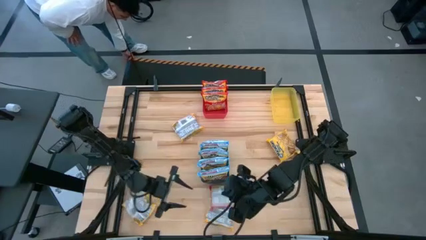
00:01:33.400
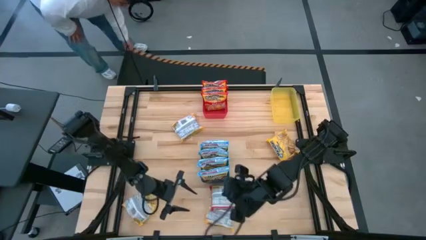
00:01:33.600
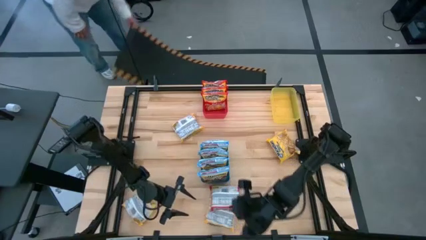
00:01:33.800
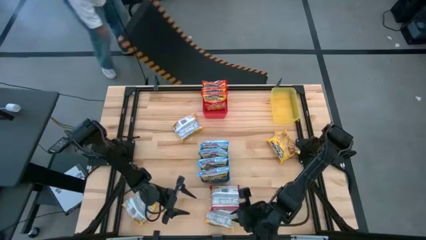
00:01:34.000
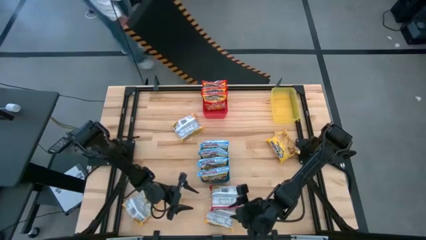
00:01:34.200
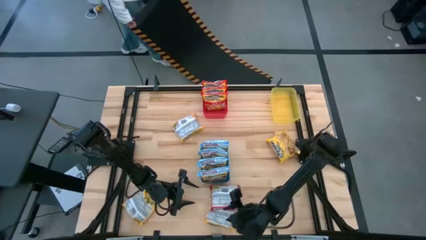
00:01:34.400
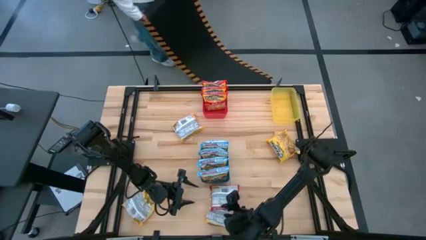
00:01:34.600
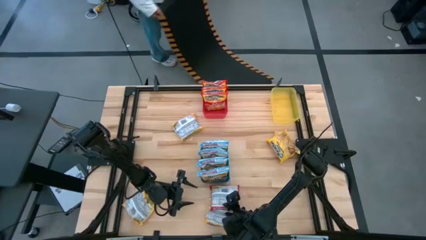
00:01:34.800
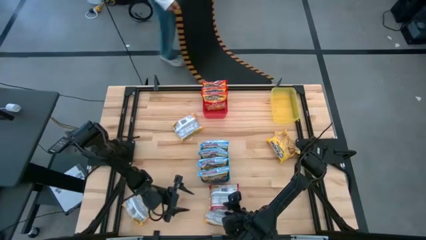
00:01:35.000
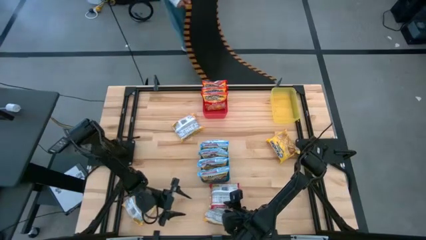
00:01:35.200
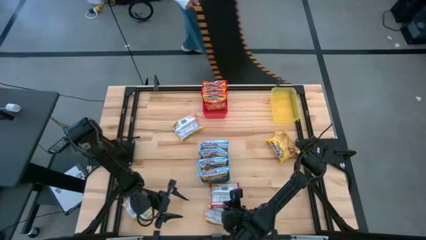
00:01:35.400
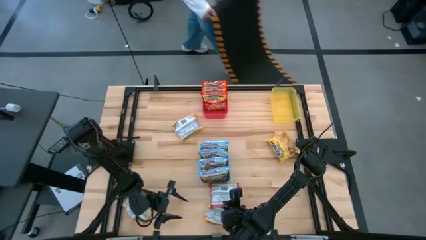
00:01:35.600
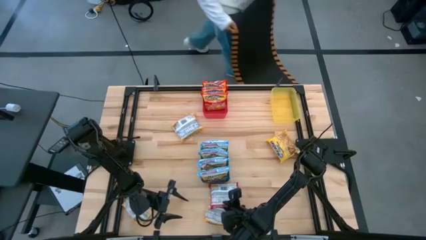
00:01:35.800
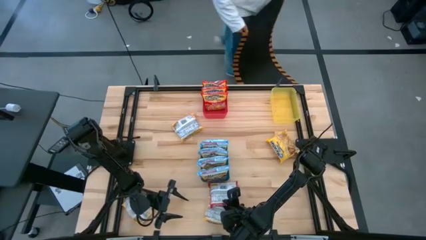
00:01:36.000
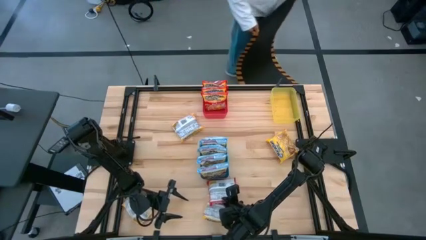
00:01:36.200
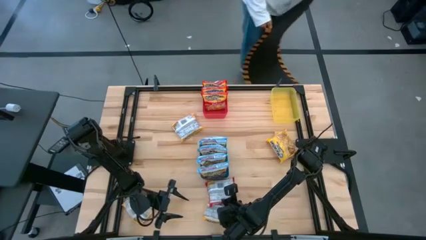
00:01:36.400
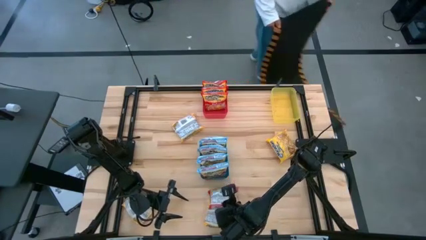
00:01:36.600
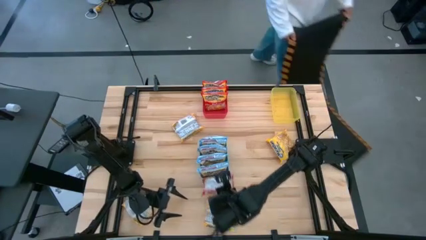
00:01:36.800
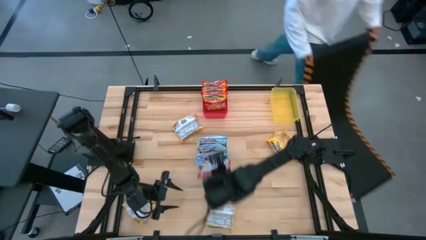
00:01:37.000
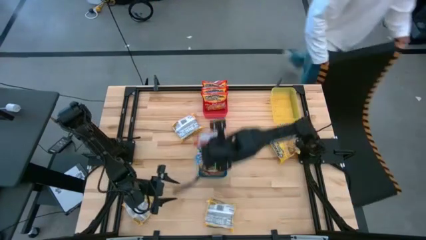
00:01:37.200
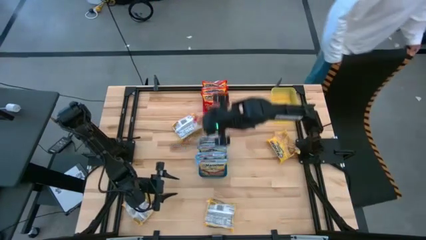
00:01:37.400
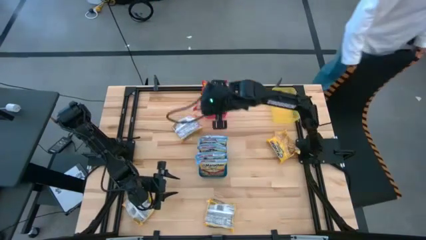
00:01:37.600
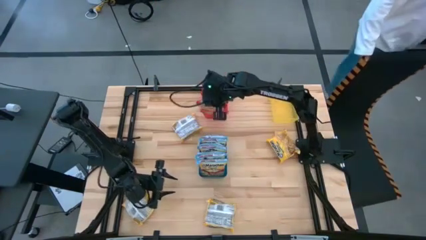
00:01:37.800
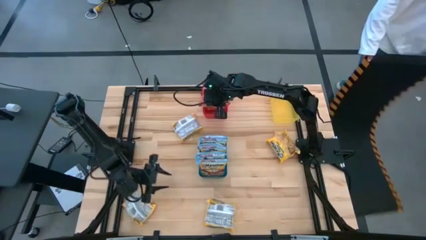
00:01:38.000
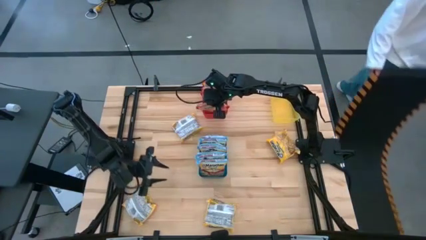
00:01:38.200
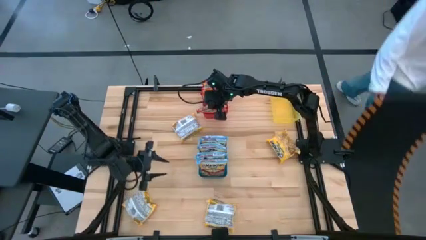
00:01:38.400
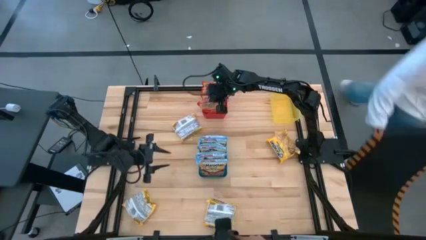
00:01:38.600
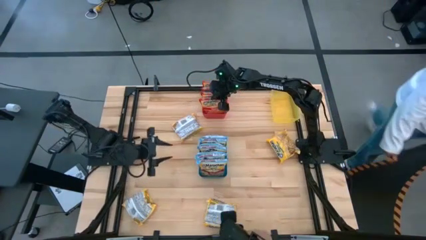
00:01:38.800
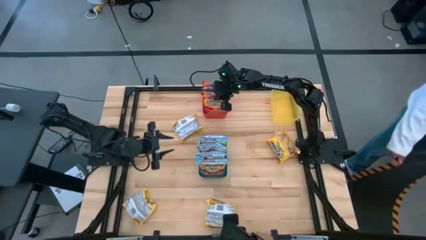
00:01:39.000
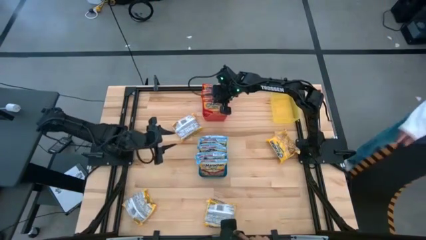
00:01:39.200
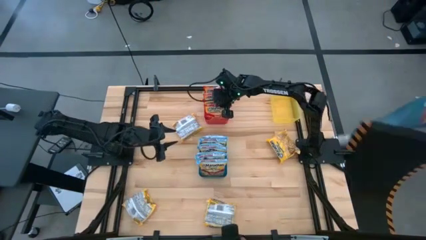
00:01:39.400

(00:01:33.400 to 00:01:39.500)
Task: Sort Maruchan noodles
Put the red noodle pack into the red bin

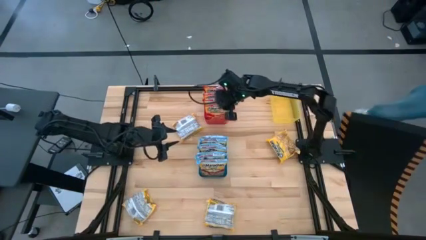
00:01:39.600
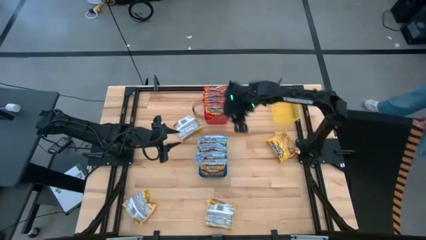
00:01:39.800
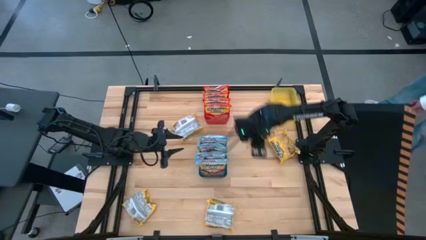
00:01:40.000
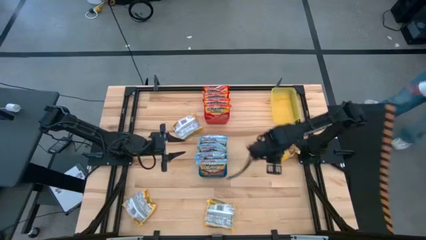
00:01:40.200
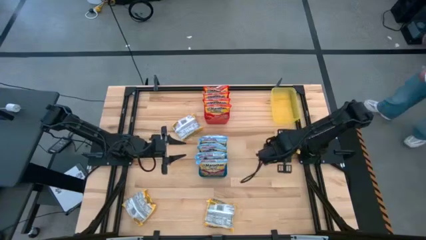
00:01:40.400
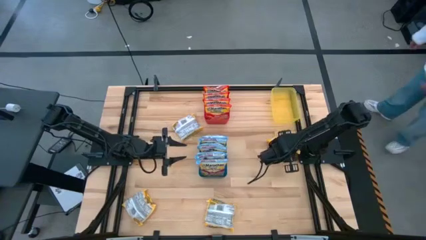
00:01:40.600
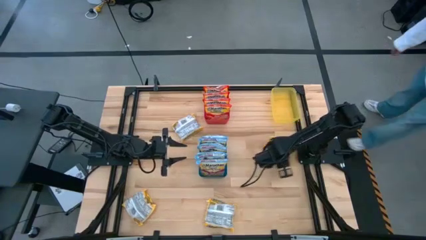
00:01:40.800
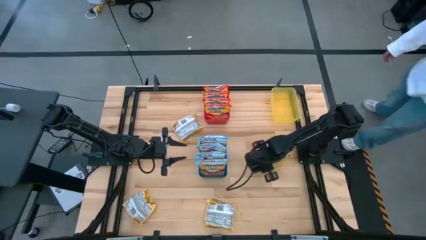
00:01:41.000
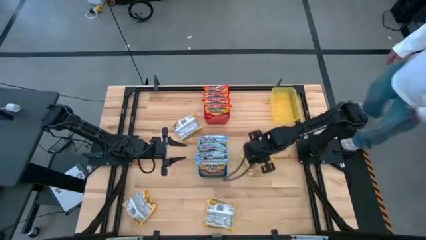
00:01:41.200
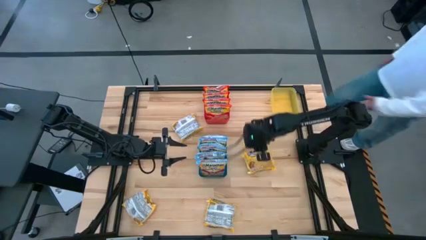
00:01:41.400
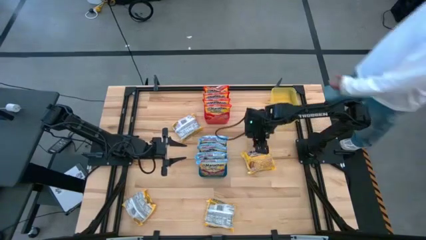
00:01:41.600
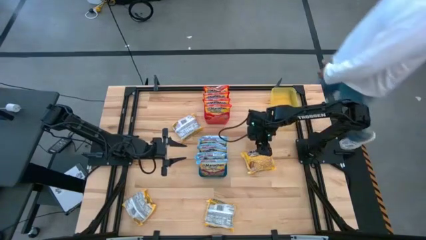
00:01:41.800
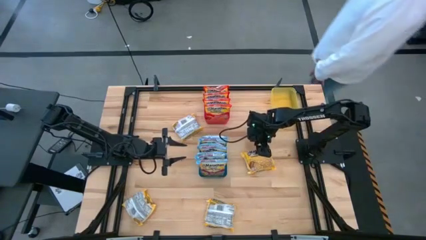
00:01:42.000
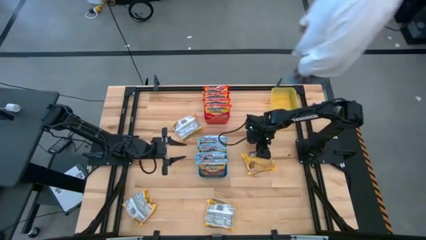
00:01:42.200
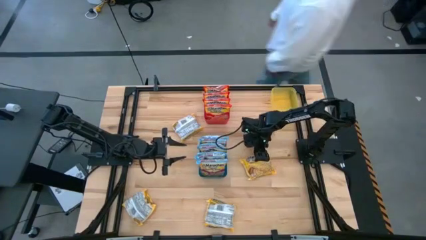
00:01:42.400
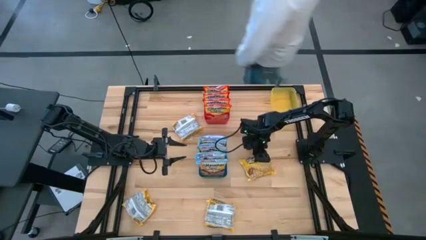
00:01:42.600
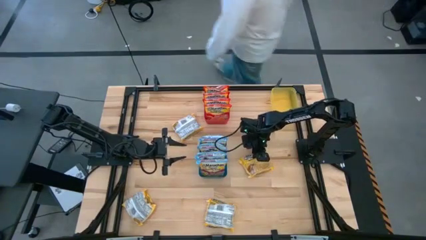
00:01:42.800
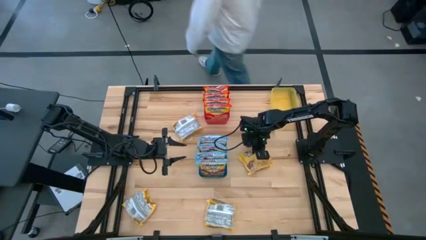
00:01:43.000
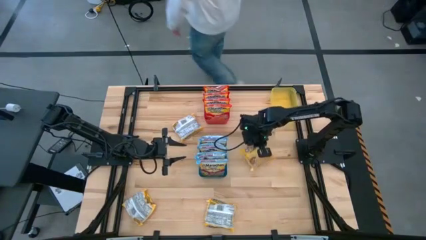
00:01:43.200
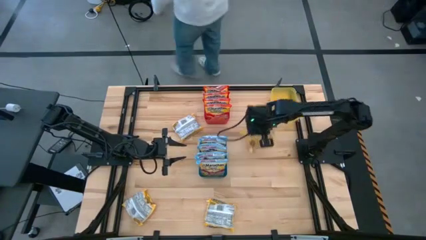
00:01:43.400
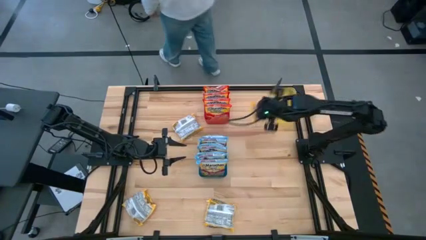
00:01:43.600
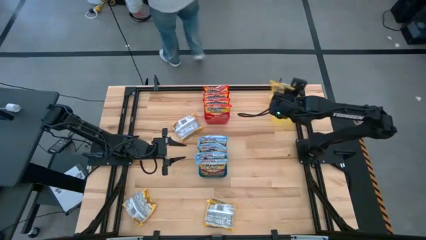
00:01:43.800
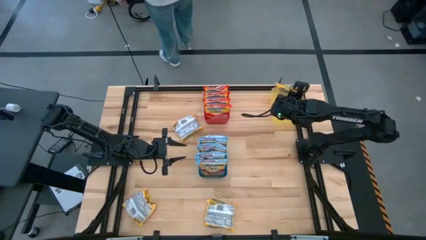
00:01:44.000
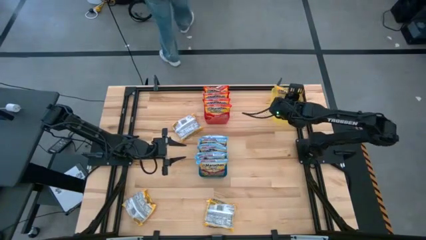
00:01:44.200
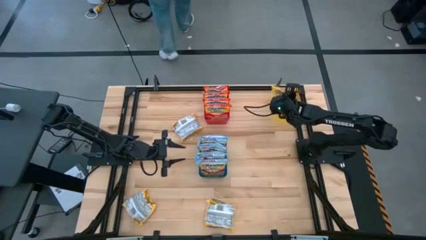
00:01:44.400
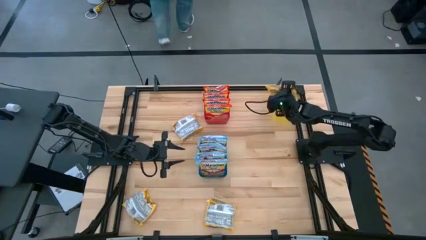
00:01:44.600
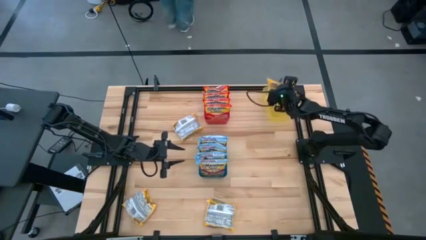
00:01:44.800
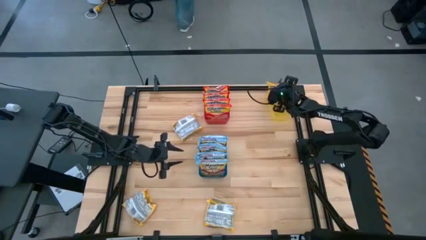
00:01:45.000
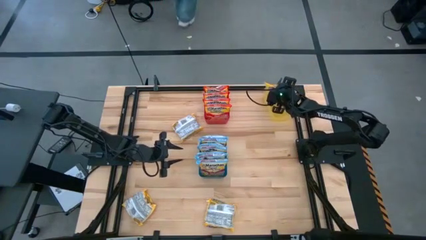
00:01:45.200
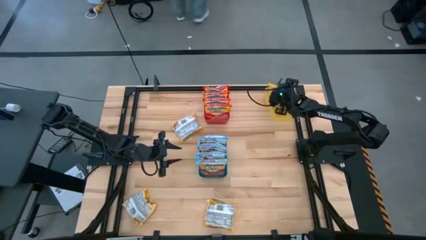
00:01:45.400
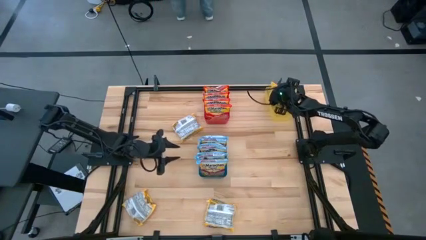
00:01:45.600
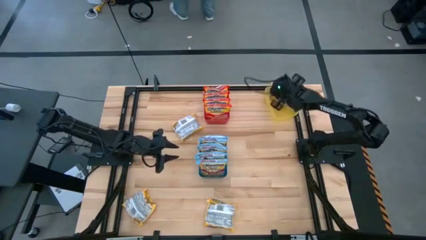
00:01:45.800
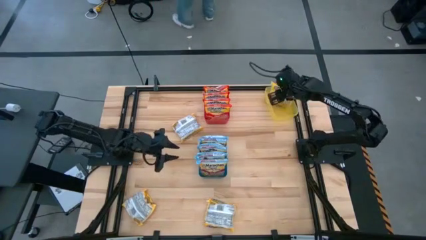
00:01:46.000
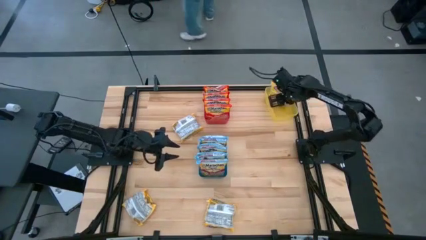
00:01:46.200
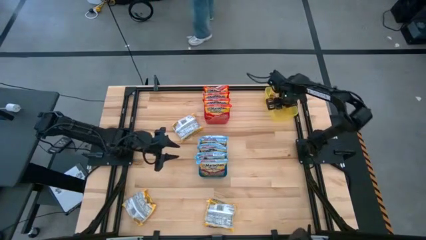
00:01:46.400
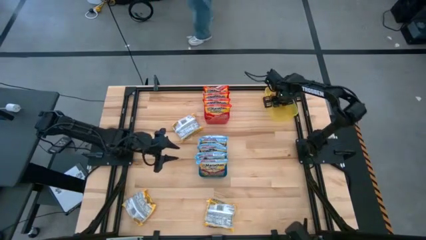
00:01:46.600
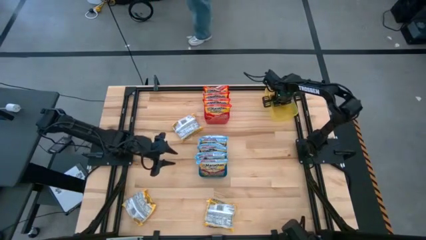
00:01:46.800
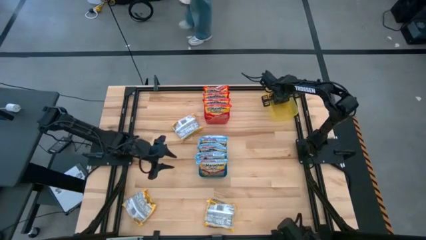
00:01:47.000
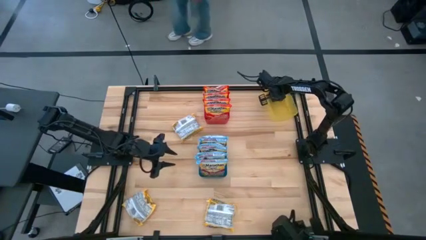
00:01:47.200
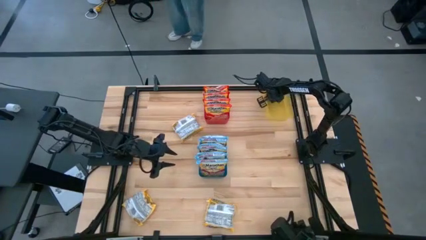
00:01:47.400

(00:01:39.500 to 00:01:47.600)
Put the yellow noodle pack into the yellow bin
